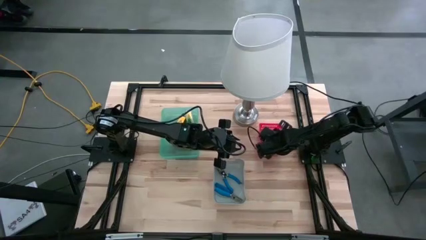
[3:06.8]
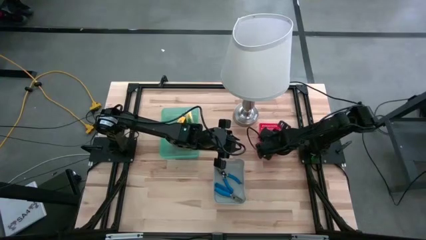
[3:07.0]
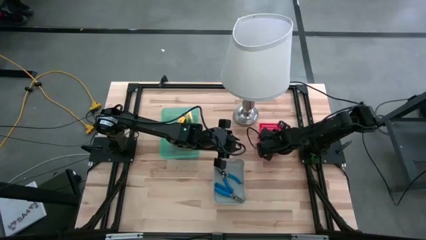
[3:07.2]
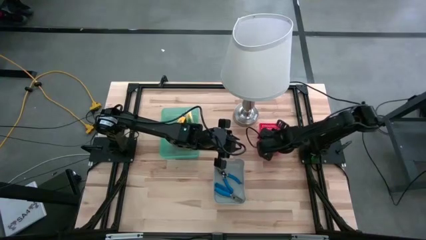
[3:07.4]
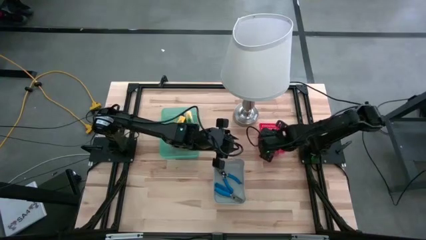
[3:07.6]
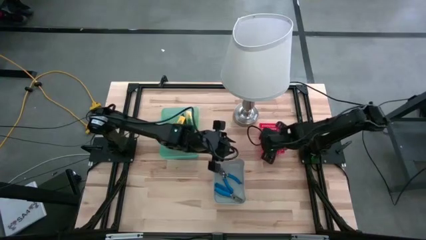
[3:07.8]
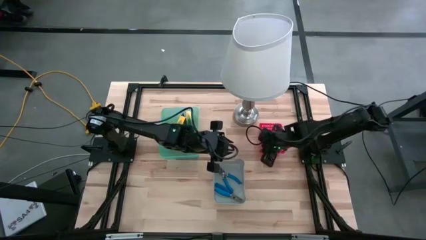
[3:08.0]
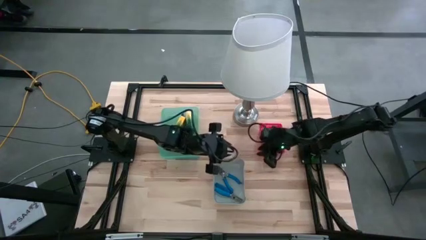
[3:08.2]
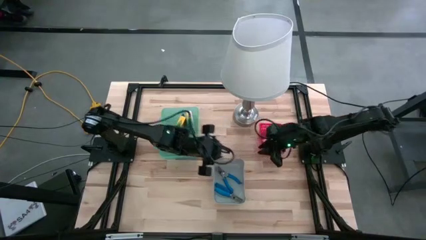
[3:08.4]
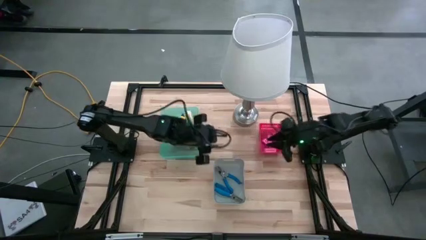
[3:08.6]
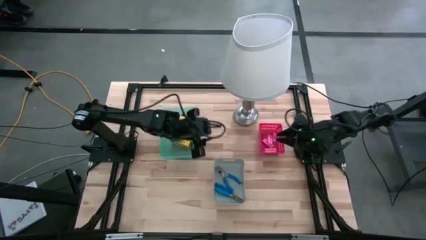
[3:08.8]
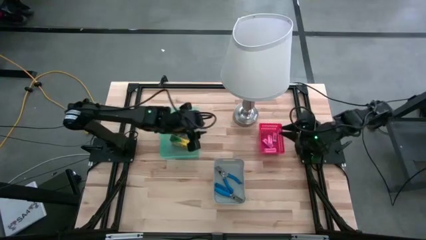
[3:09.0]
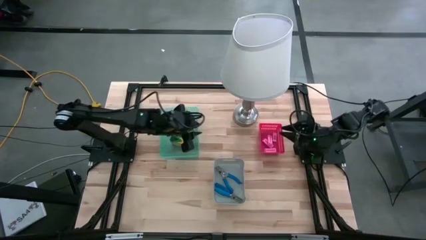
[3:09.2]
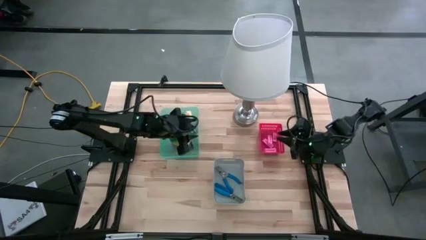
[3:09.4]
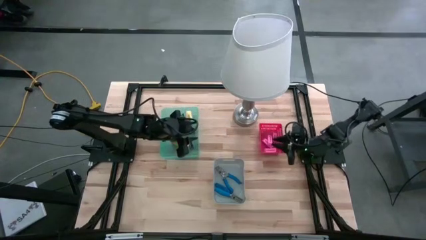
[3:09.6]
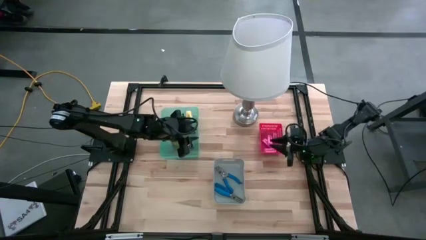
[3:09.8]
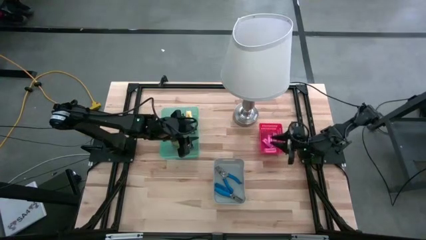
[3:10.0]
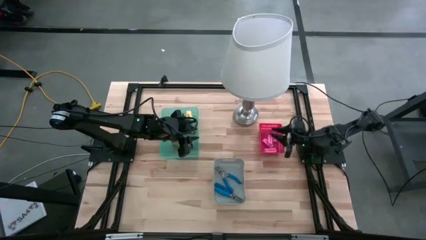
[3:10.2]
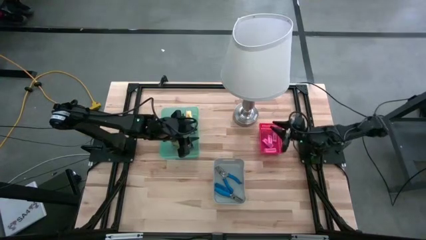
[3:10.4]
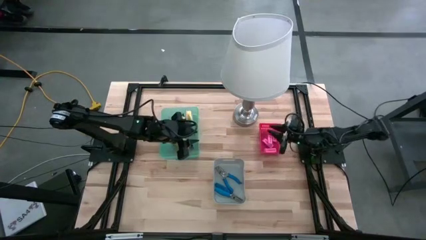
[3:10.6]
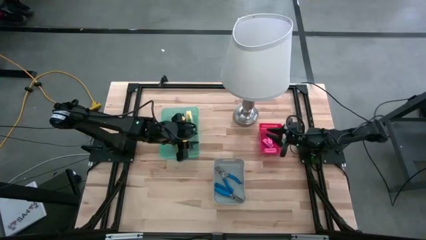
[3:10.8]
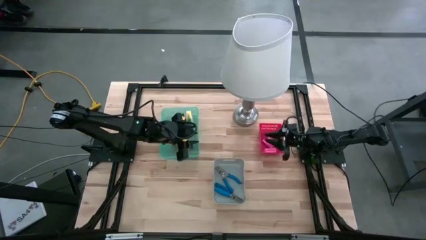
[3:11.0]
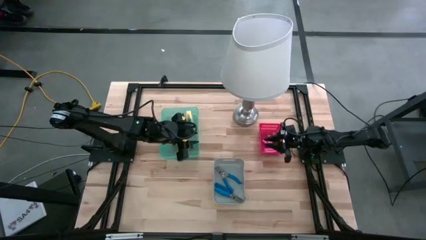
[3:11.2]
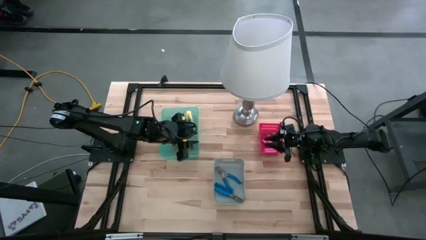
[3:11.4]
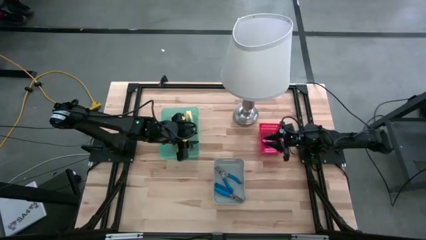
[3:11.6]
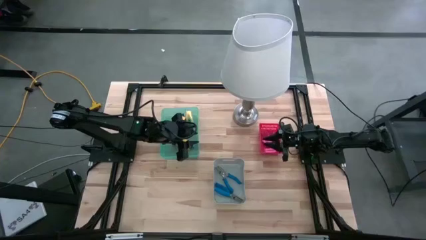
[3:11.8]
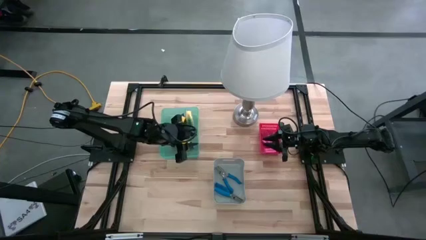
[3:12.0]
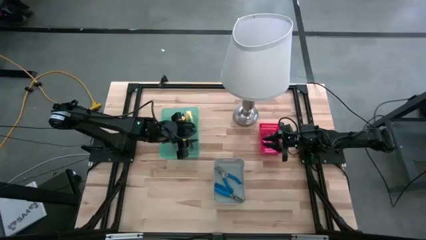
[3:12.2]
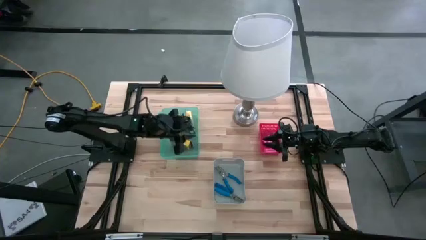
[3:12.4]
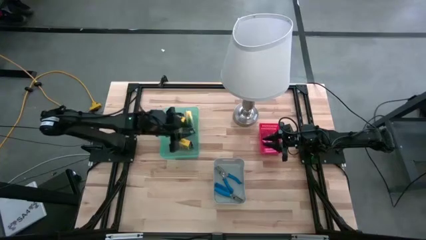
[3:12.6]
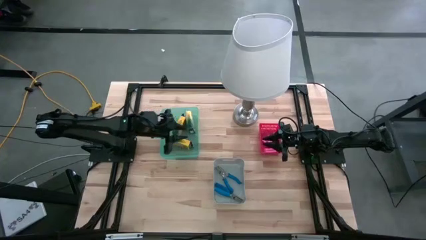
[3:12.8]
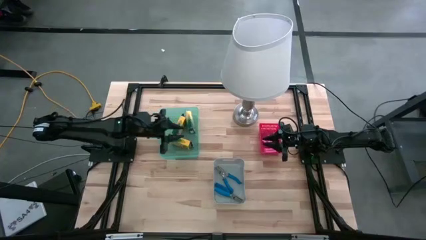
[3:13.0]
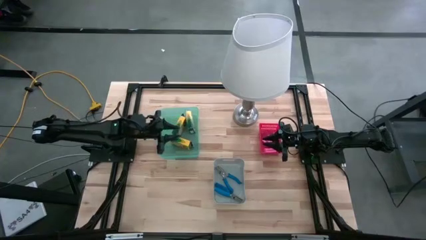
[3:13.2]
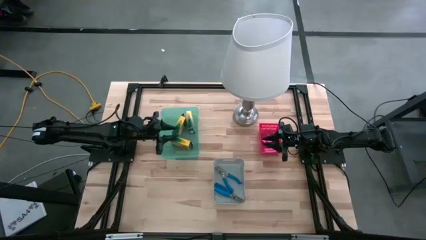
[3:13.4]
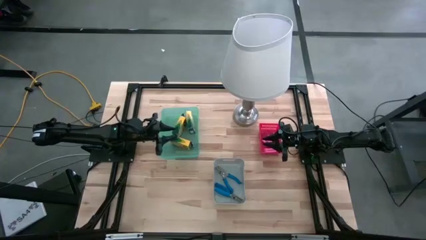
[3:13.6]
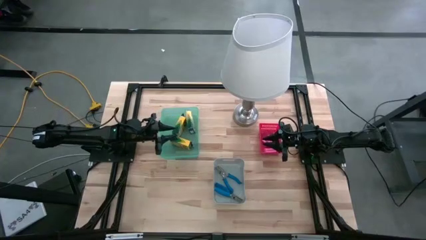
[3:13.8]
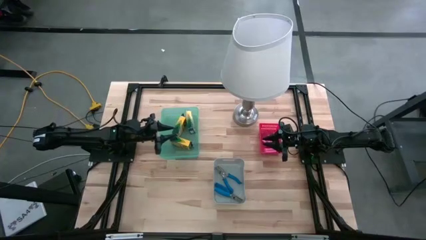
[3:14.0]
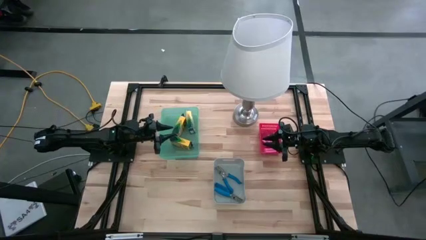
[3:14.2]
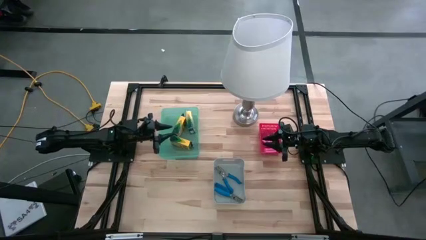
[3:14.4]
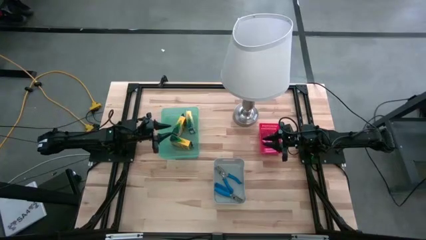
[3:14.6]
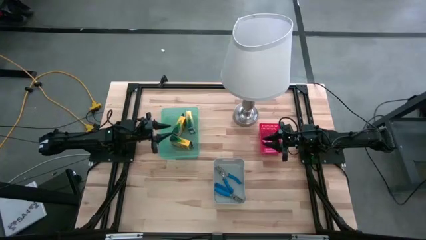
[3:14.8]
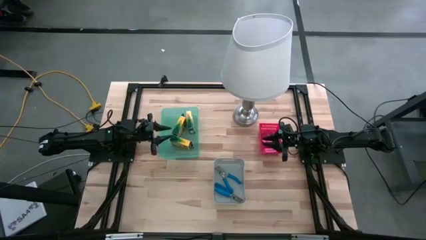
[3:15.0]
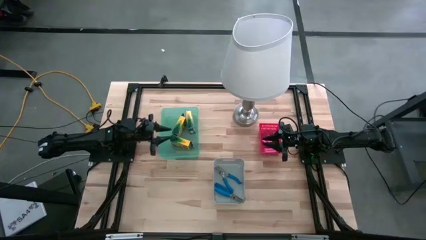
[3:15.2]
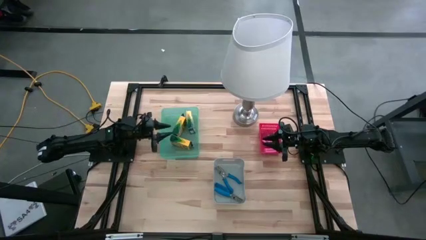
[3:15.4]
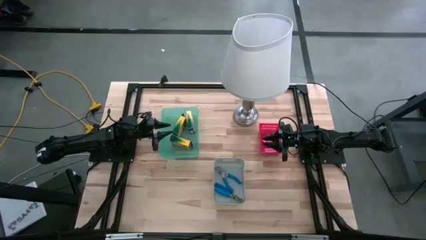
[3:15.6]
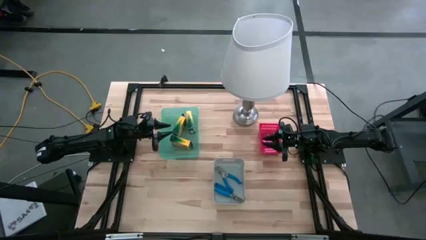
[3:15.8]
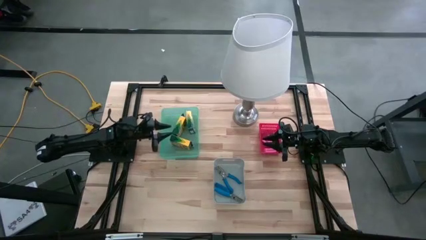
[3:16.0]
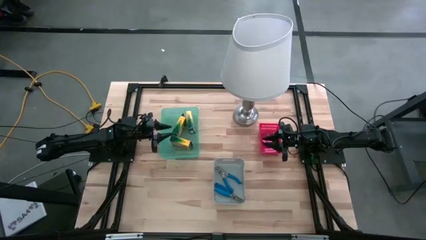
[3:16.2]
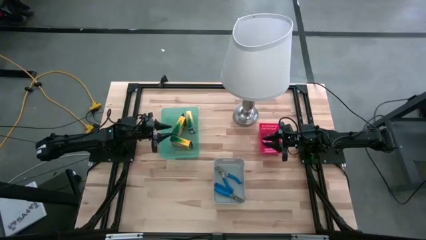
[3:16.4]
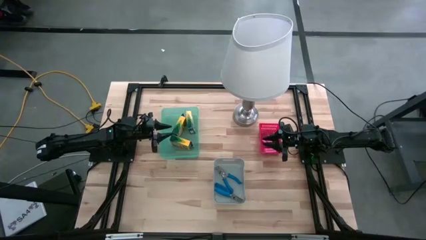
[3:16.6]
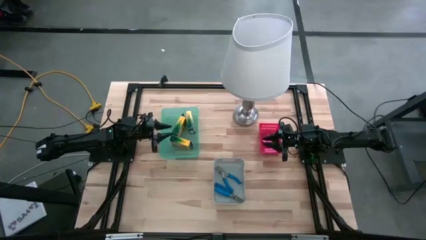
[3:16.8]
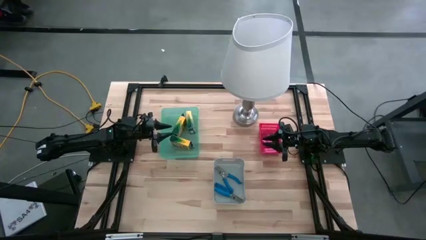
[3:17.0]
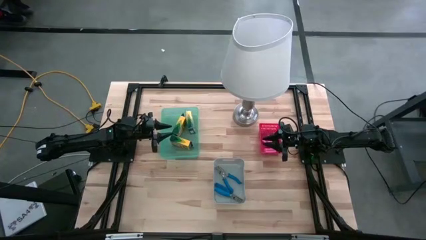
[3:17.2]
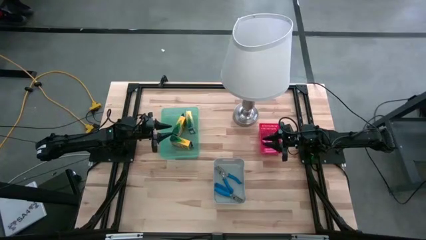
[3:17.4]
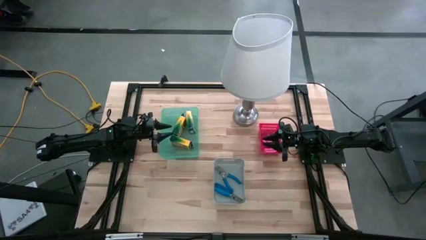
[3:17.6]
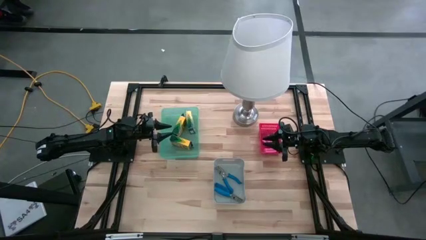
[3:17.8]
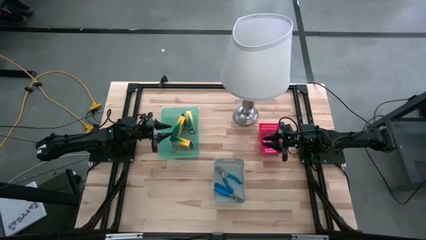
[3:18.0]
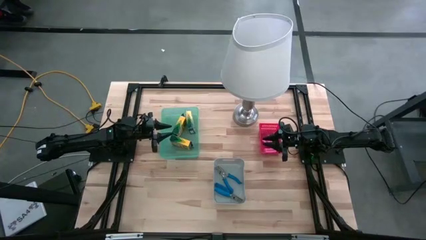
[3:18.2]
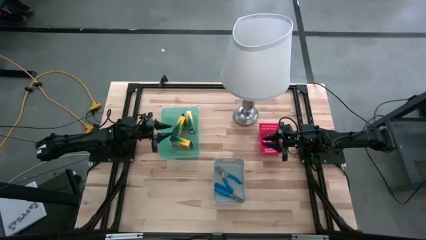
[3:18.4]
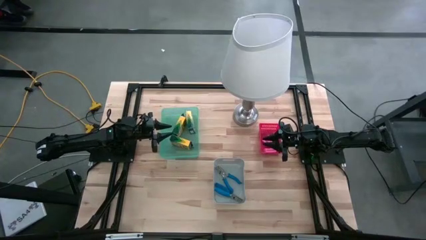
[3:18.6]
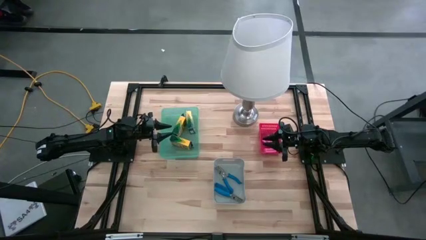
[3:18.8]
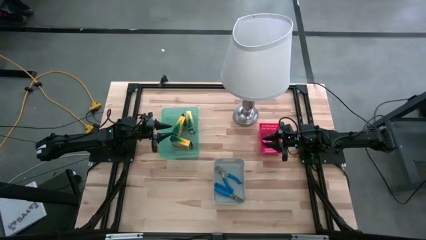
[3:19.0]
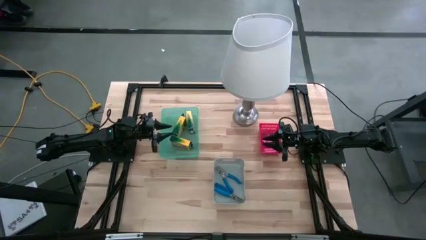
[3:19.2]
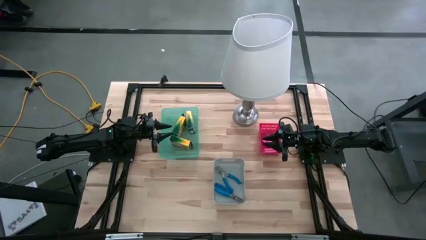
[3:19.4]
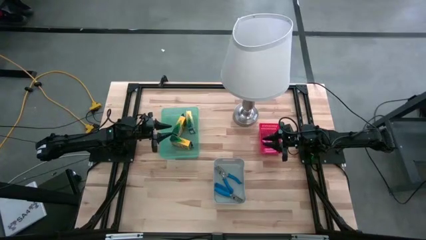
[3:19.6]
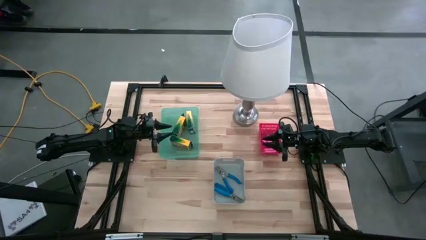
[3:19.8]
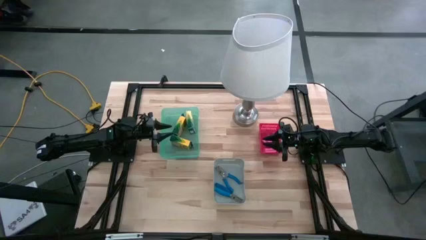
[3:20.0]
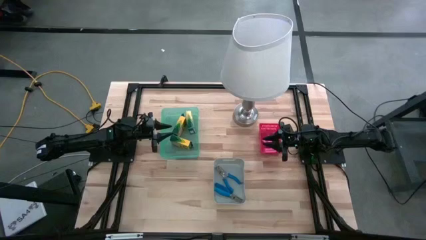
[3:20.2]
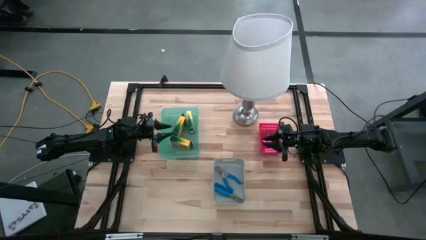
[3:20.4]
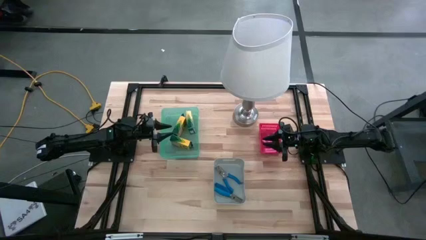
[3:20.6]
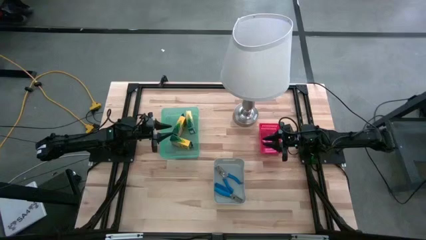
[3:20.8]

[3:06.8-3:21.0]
Task: Pick & Place School Supplies
Return to Home Position

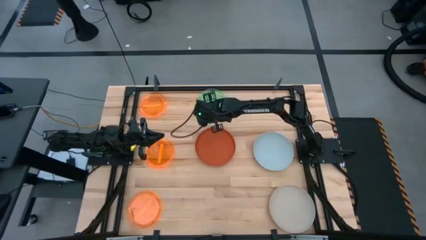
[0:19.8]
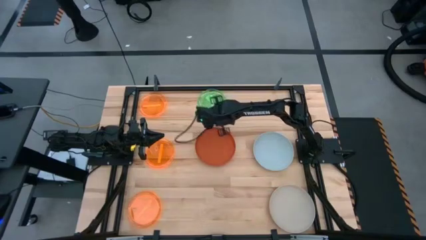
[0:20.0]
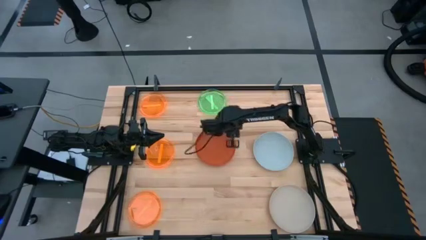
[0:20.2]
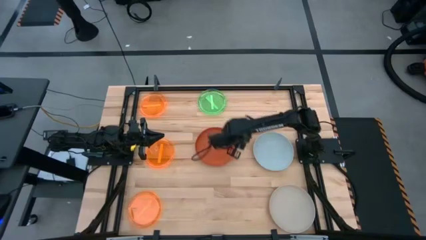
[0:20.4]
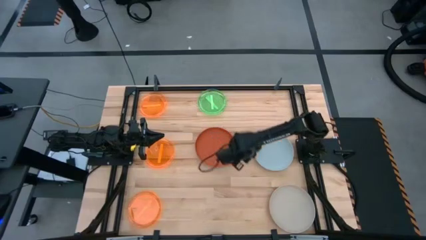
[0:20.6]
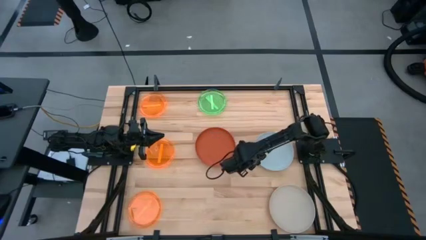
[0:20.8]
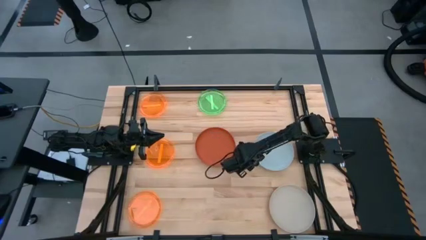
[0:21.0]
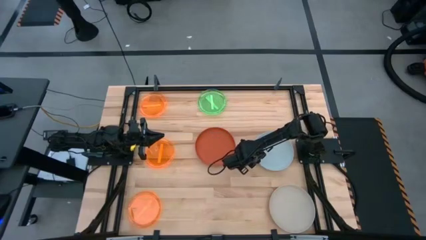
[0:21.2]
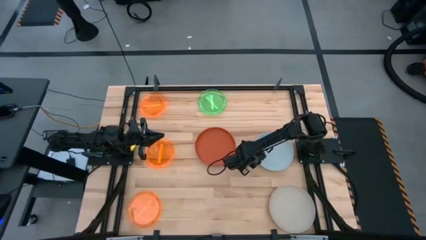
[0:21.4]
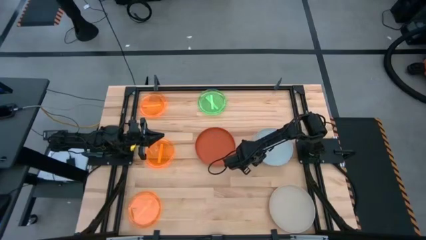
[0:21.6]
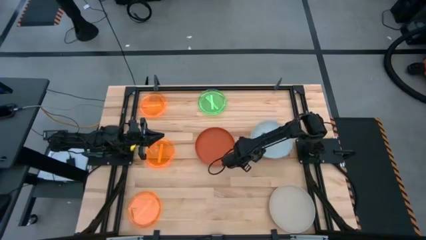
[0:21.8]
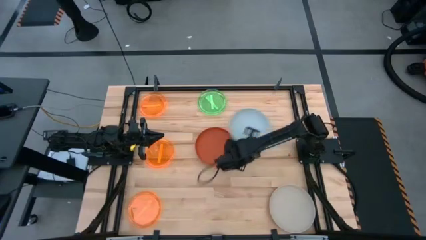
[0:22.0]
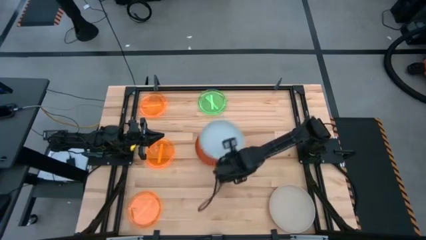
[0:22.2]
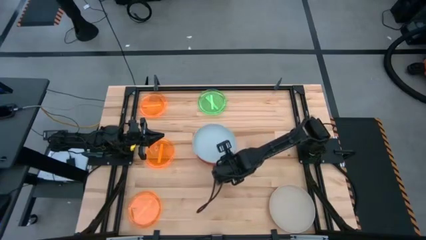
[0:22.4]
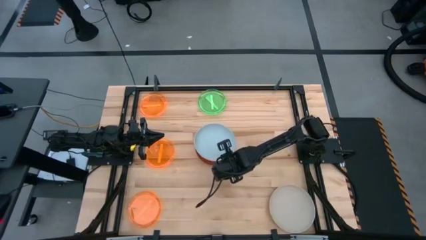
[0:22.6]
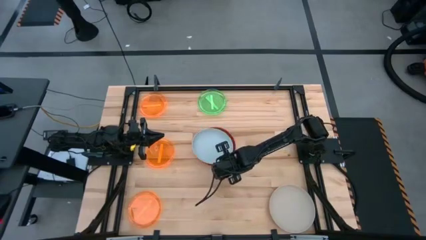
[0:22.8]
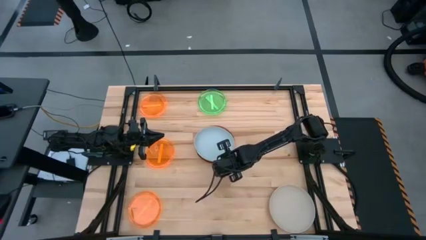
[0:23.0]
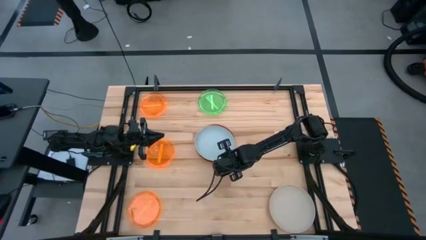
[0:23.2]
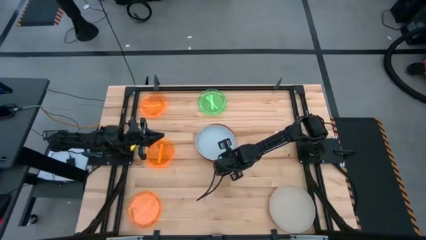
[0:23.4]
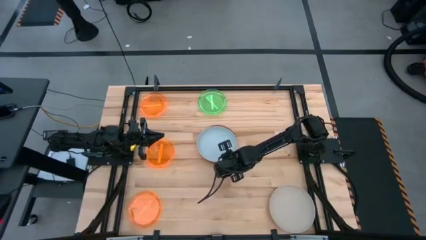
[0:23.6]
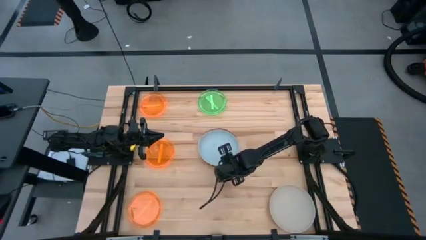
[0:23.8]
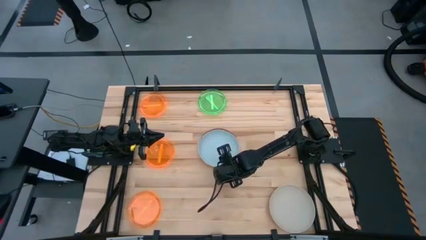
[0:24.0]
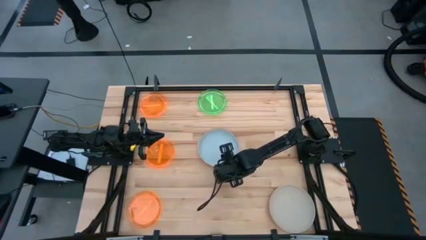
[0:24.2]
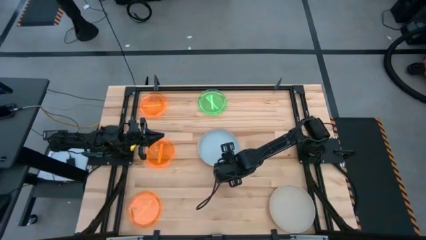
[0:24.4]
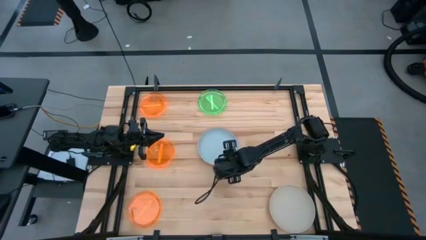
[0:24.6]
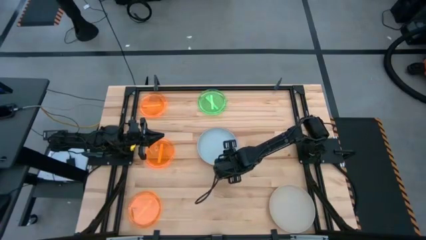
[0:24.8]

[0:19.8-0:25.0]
Task: Stack plastic plates
Stack the gray plate on top of the orange plate
